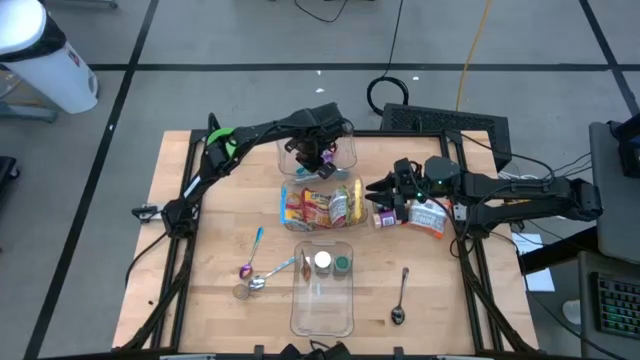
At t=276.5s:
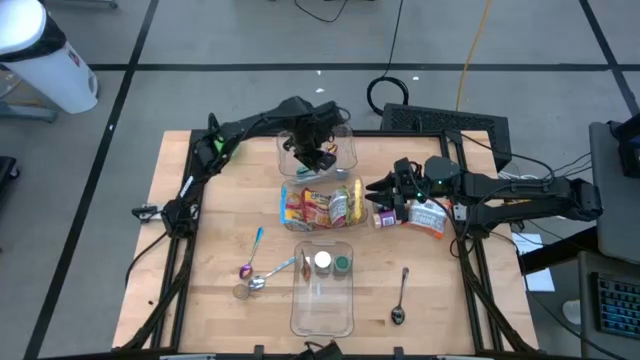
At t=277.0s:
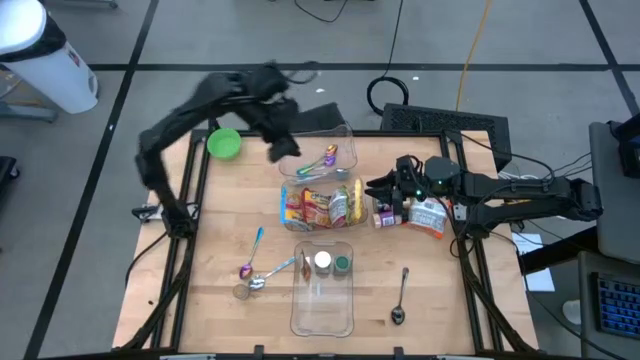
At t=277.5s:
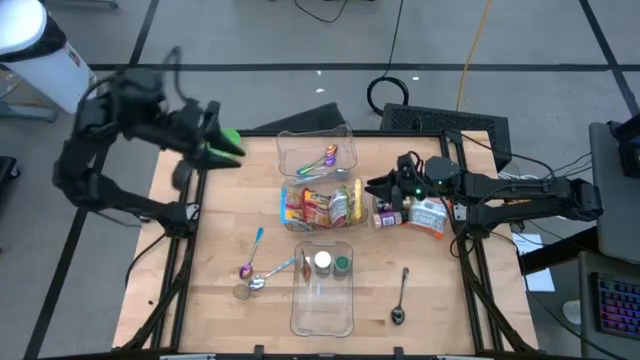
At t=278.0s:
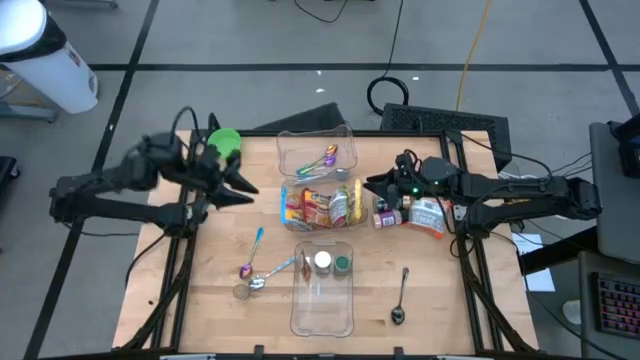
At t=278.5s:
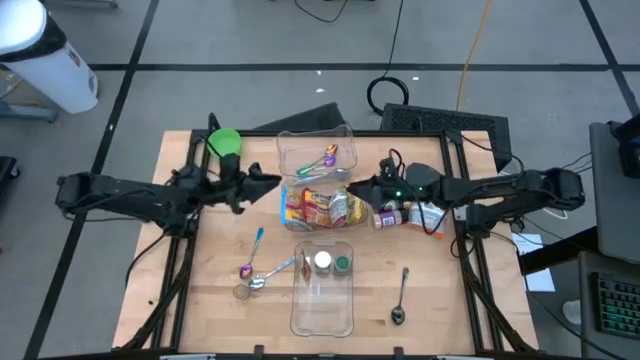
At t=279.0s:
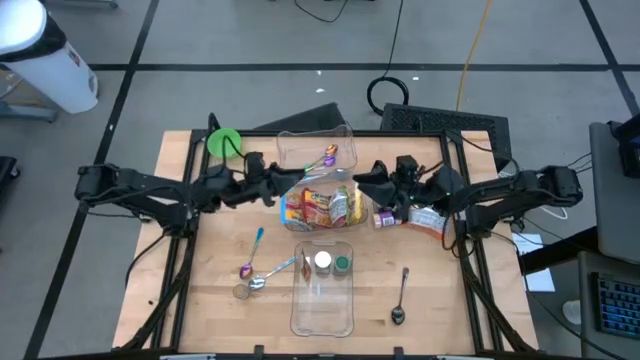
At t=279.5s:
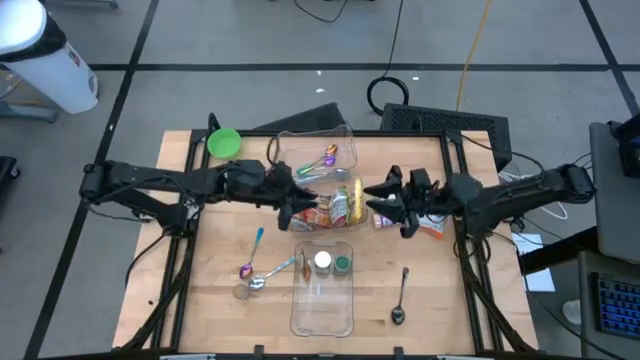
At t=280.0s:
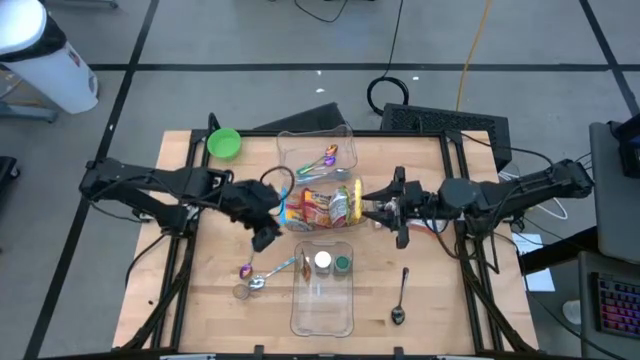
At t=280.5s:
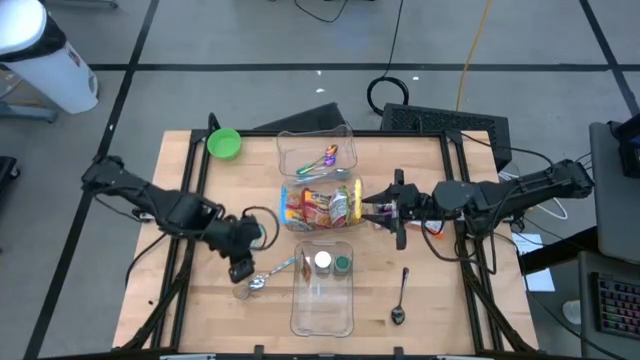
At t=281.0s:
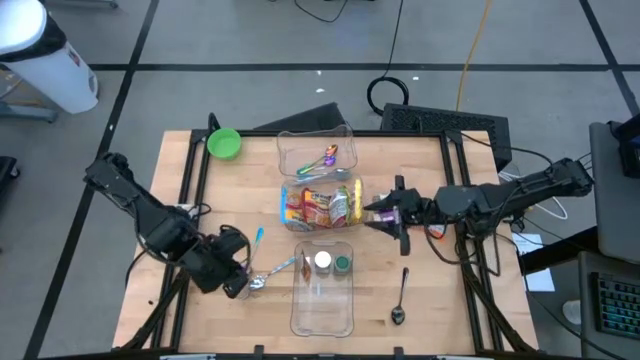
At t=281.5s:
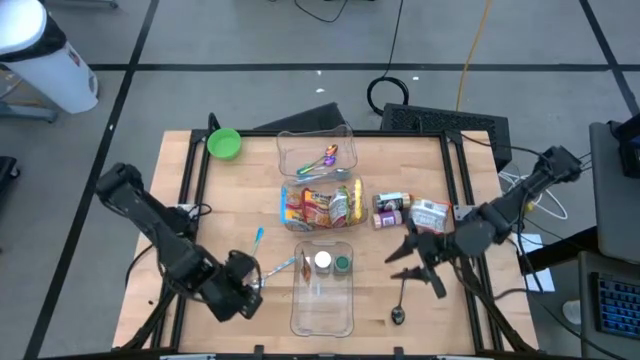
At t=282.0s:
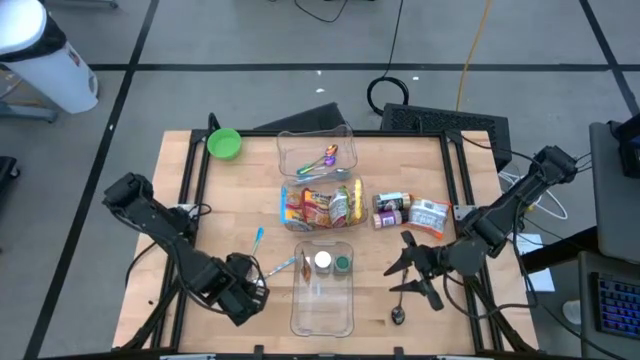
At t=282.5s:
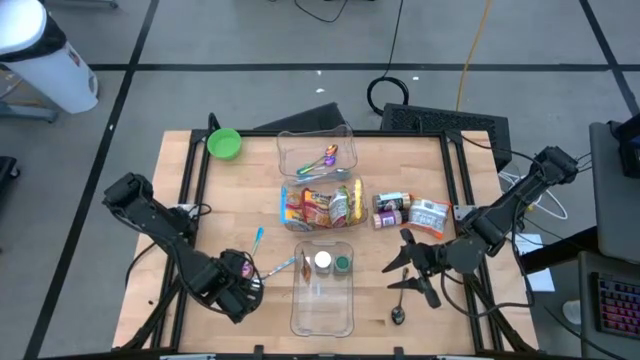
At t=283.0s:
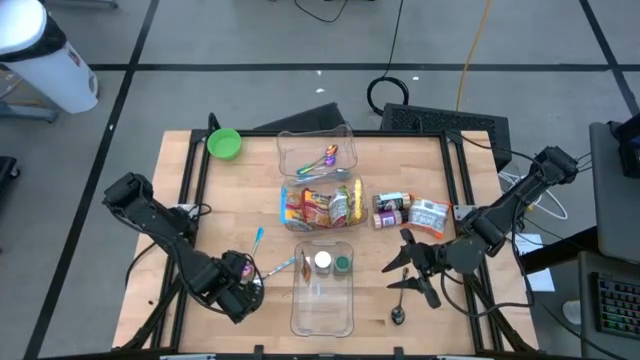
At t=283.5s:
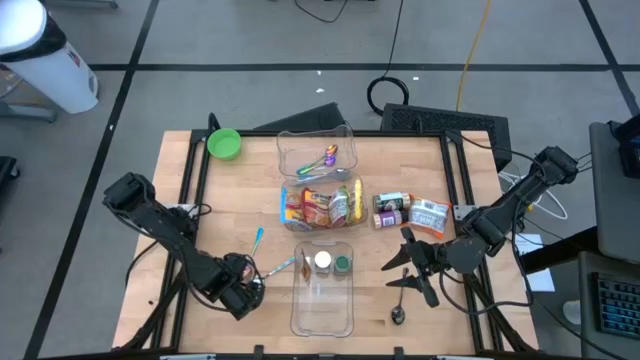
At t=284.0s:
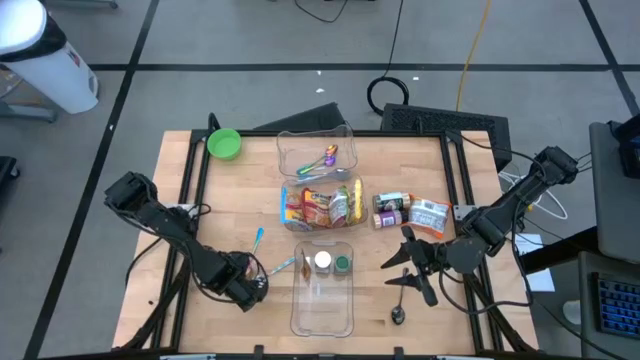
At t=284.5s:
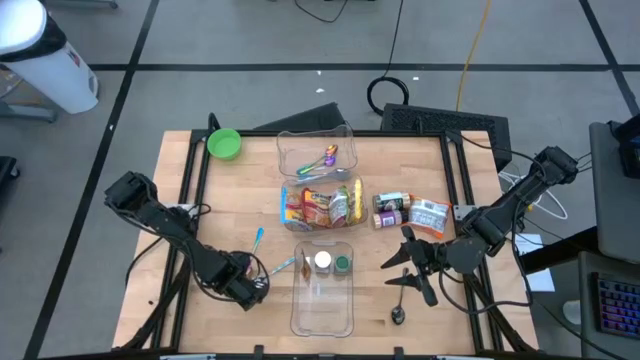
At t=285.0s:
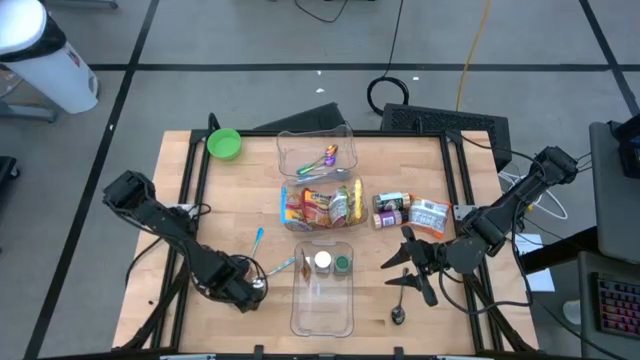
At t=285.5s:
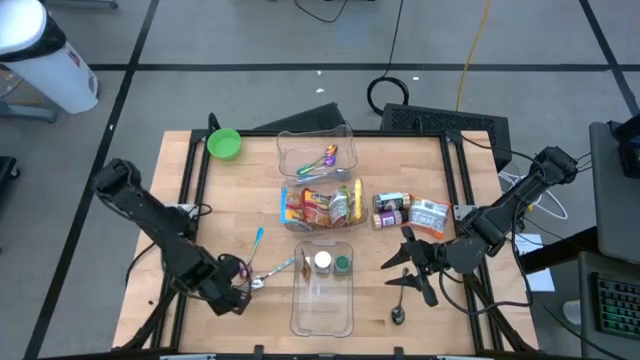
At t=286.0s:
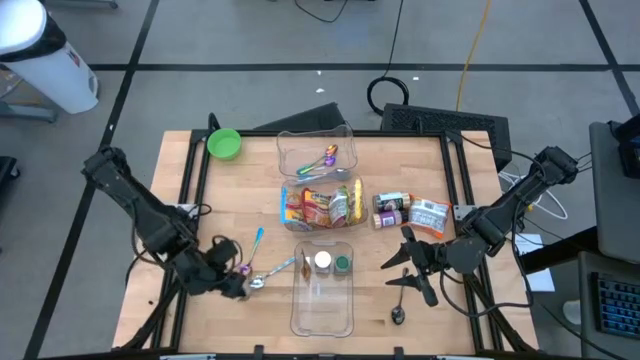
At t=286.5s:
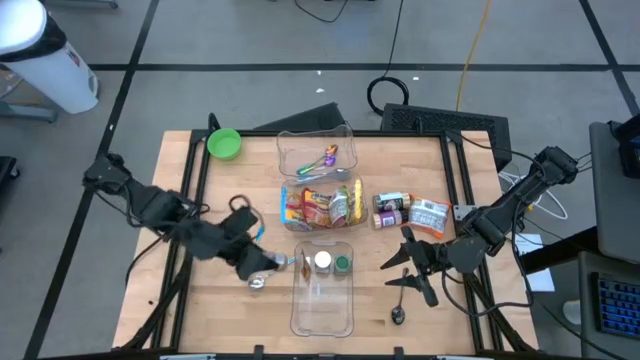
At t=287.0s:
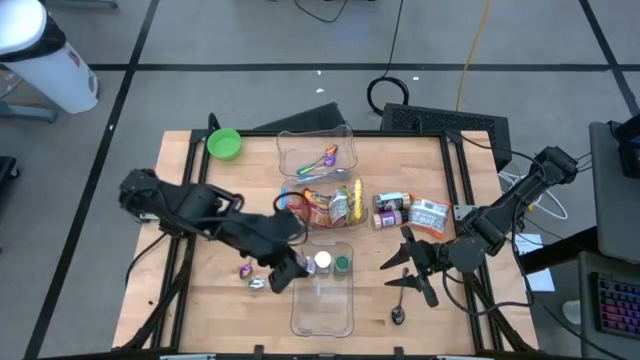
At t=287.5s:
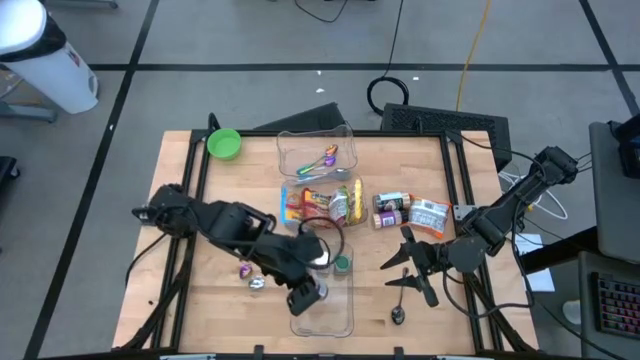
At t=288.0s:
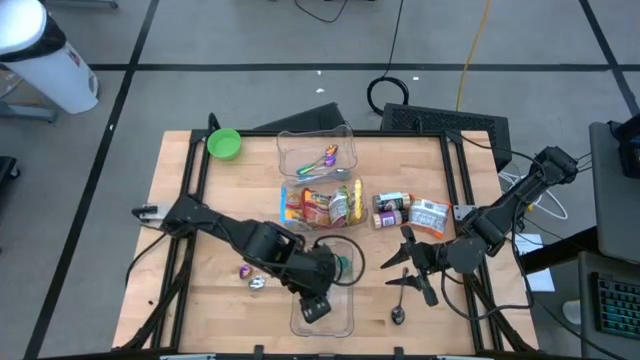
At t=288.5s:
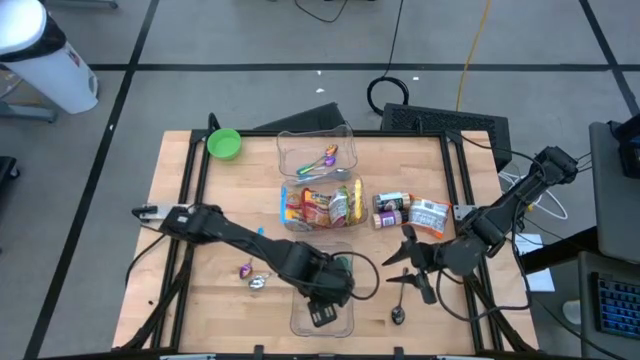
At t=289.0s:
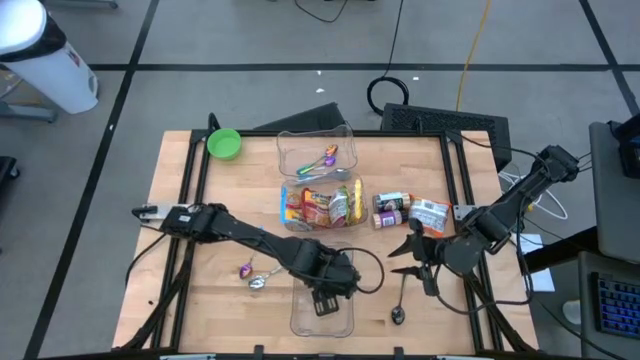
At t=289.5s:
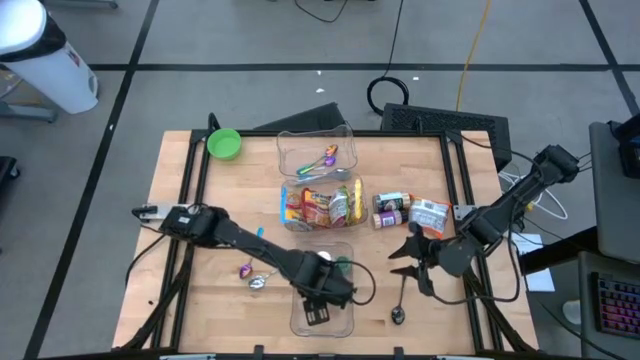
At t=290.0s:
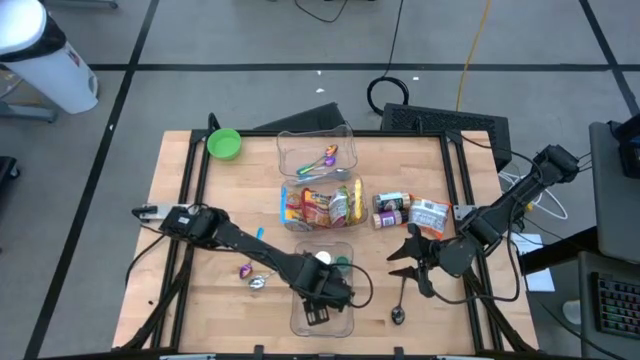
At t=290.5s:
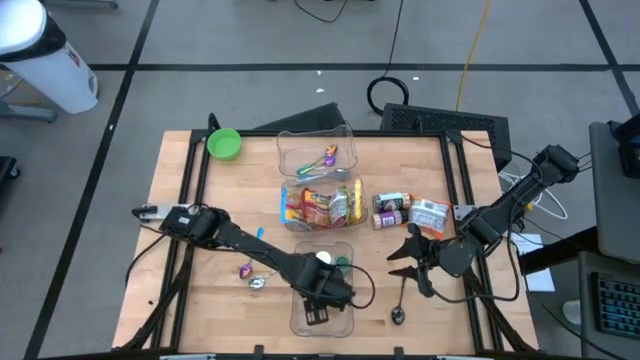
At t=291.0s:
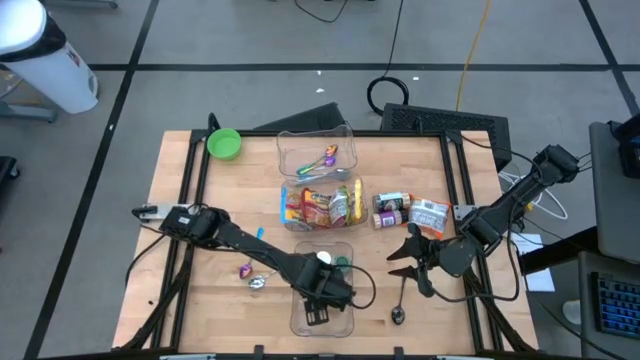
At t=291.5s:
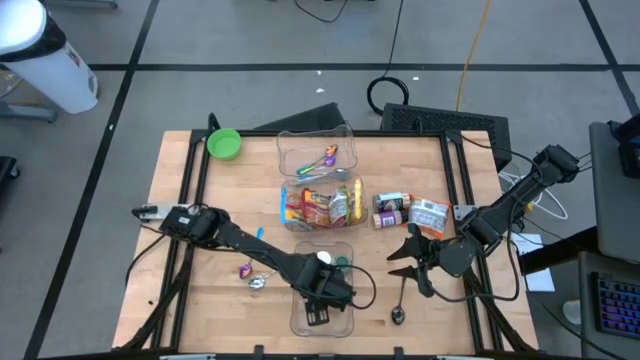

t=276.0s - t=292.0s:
Task: Pick & Place Food Item
Put the brown seasoning bottle into the bottom transparent bin

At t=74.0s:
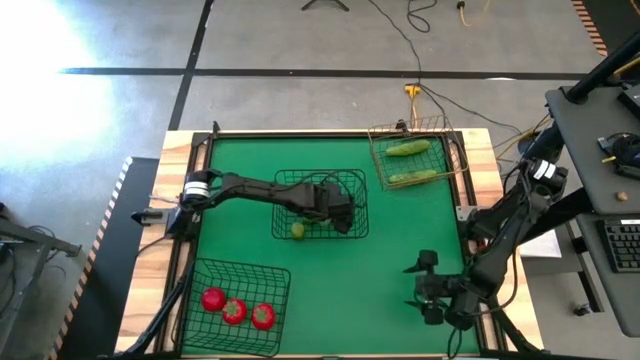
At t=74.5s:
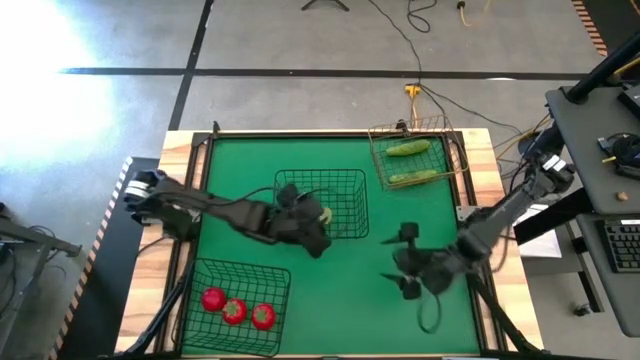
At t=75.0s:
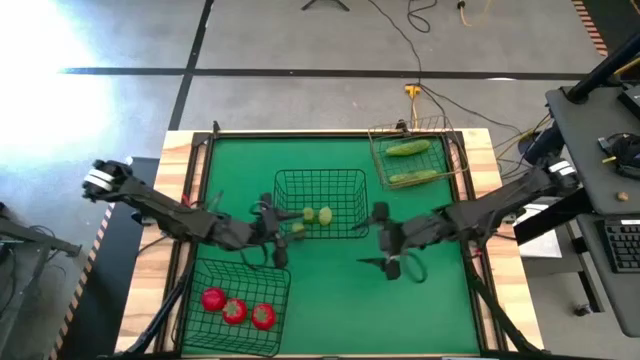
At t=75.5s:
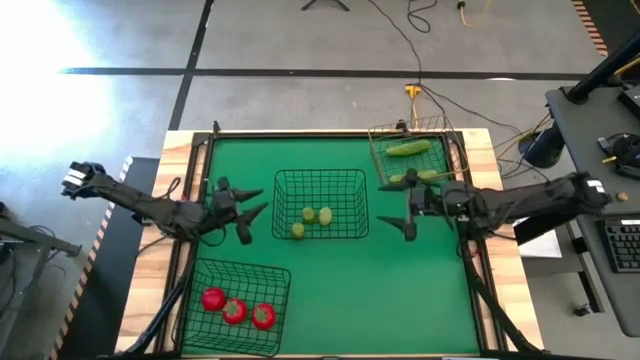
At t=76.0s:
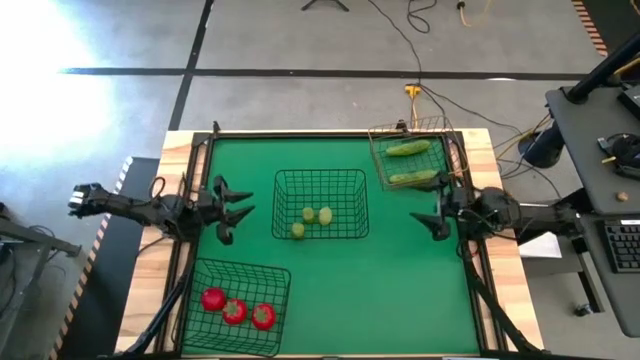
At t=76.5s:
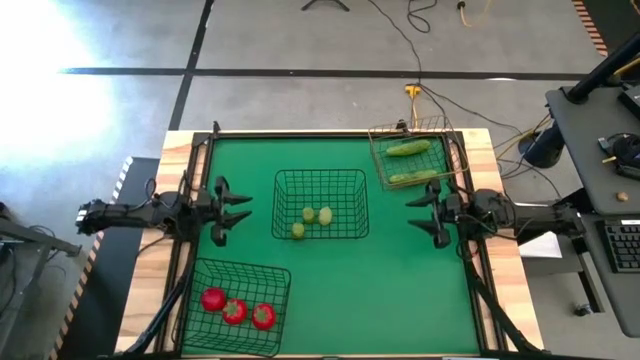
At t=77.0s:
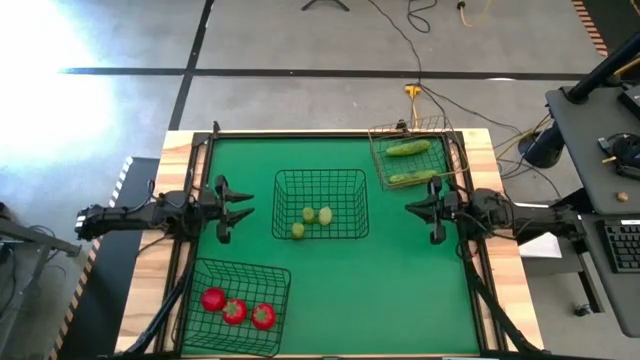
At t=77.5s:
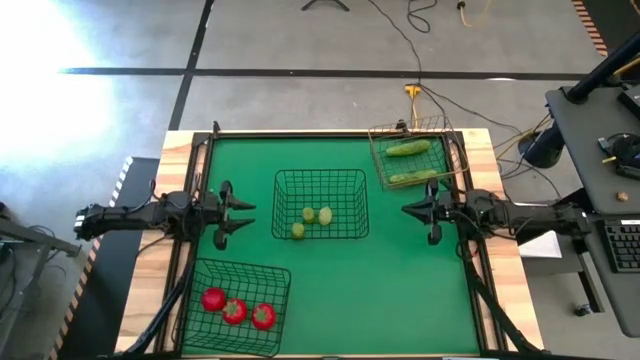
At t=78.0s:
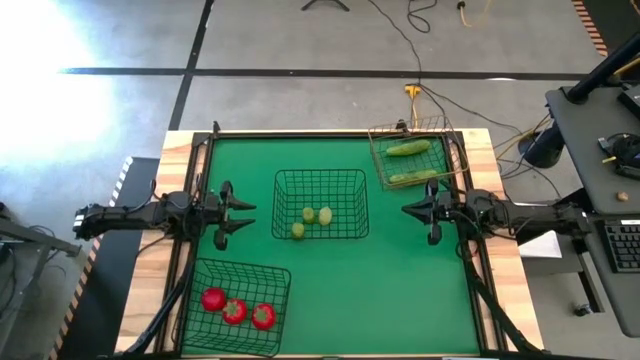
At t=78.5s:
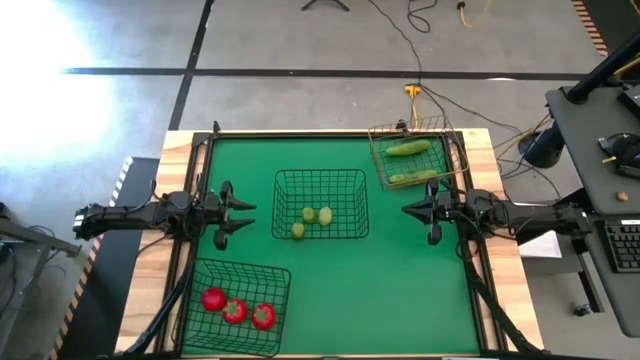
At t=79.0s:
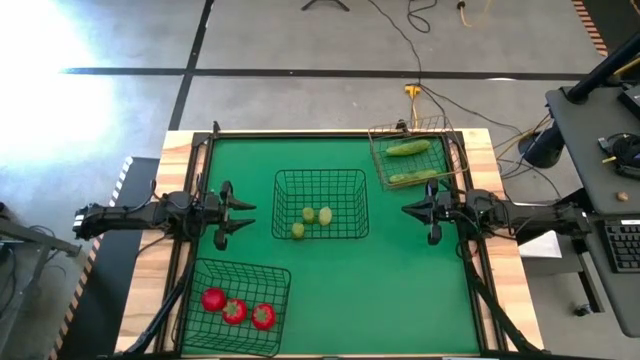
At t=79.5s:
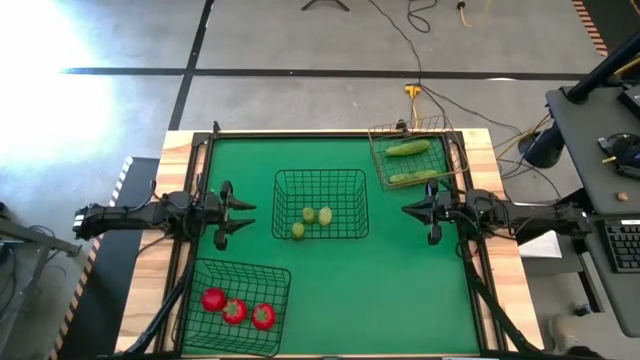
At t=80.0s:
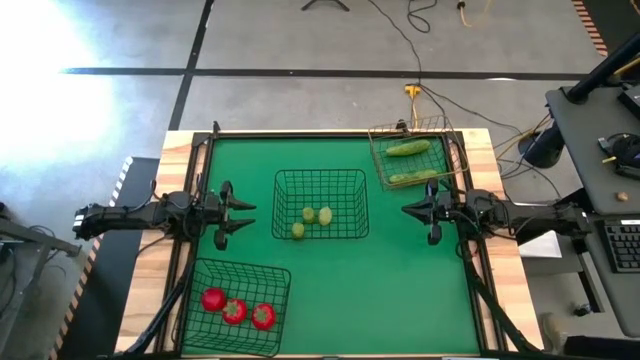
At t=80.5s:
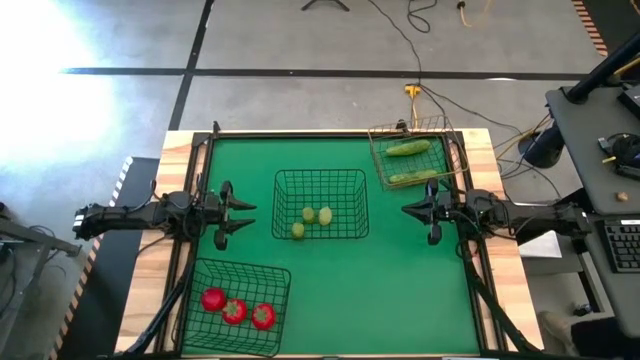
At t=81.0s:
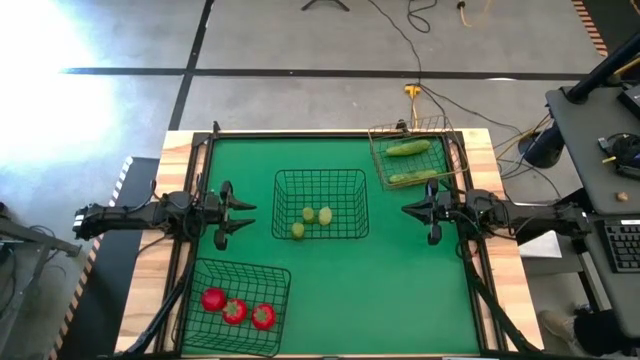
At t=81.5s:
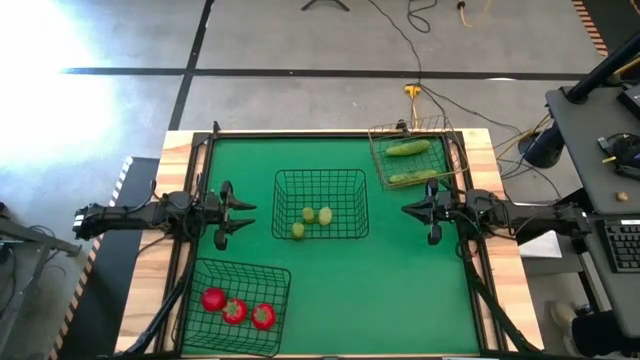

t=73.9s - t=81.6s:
Task: Sort produce into baskets
Return to Home Position
